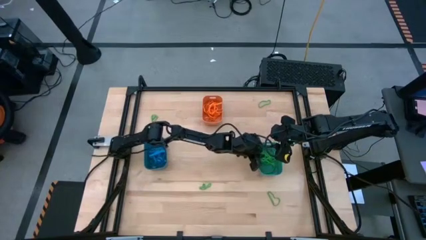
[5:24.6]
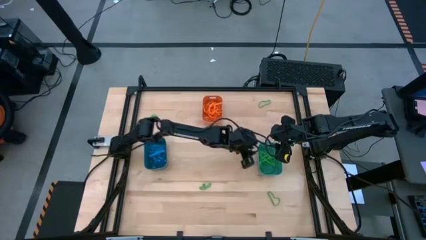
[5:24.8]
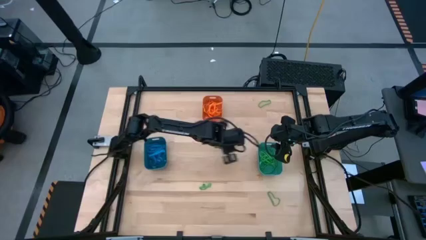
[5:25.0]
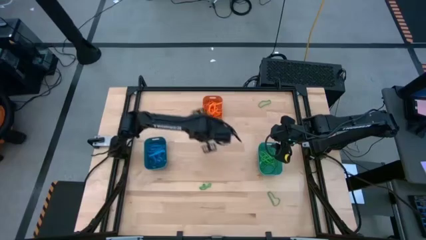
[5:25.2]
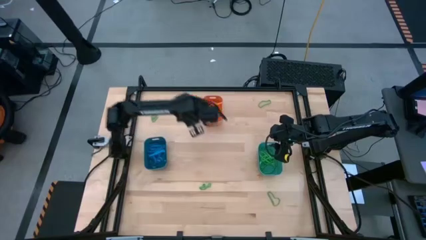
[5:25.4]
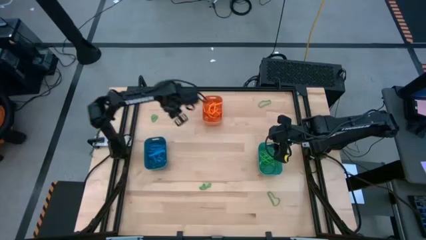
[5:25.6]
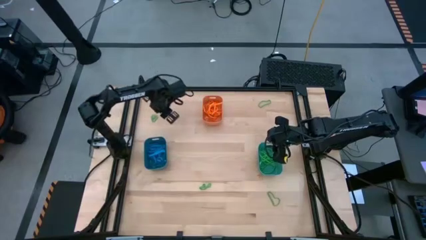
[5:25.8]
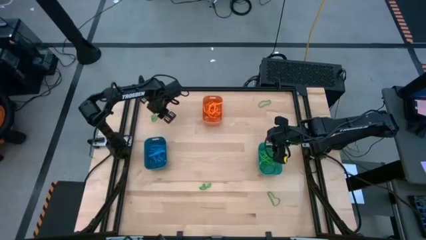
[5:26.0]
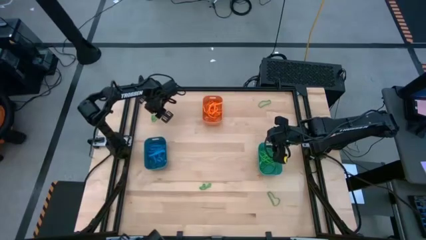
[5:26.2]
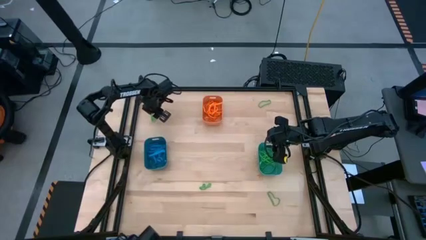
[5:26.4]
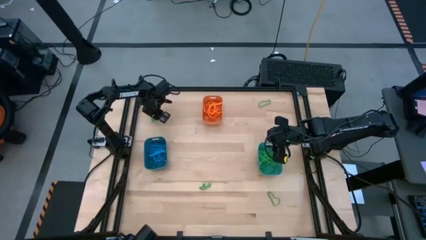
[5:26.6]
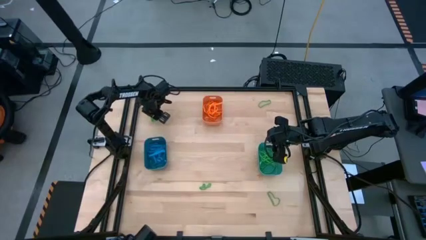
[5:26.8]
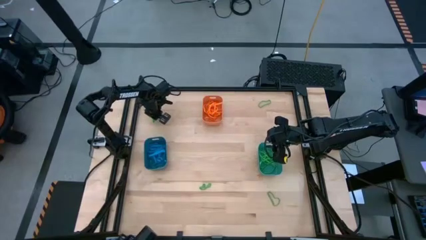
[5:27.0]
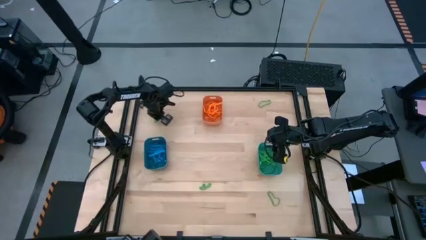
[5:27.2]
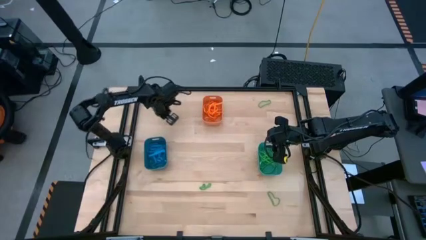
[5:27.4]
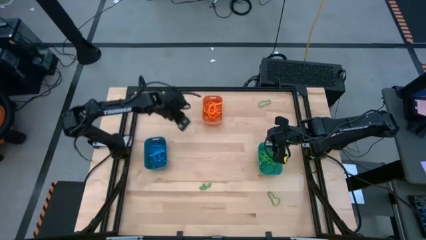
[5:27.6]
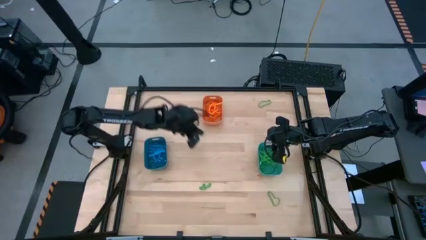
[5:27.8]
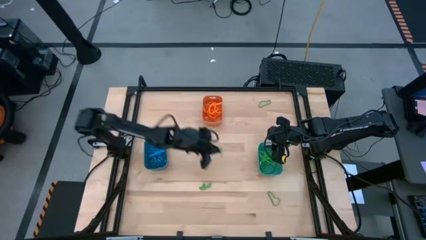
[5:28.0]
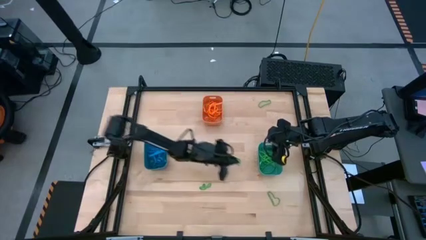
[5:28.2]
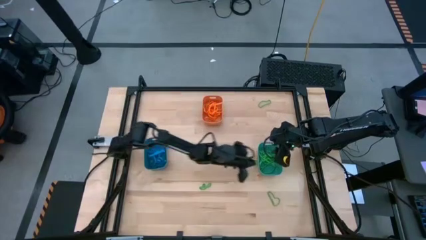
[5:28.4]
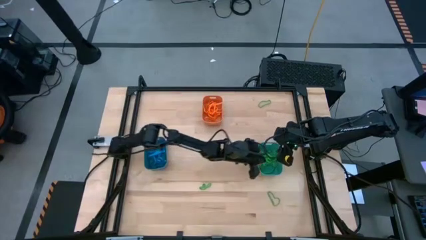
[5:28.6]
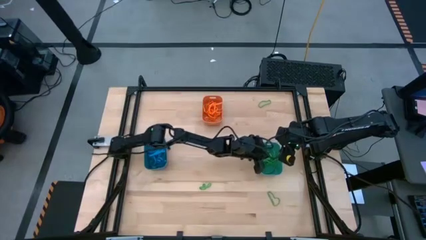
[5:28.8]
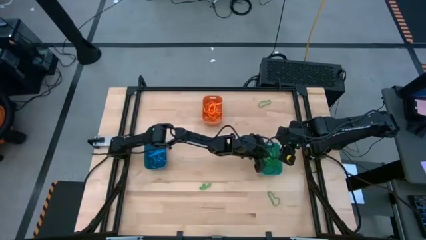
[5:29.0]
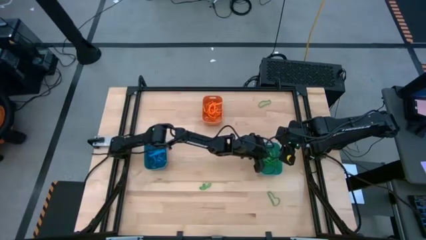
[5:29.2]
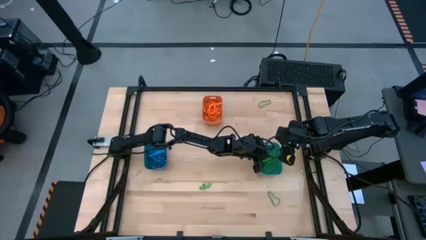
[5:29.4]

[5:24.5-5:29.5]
Task: Sort rubber bands into baskets
Put the green rubber band into the green bin

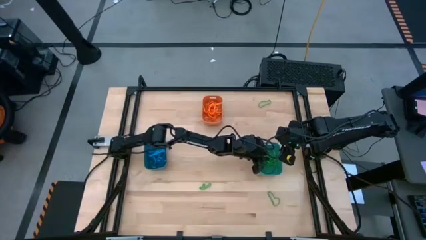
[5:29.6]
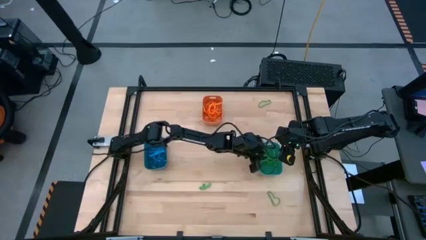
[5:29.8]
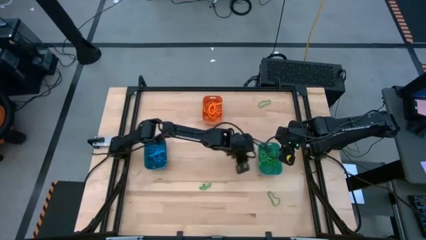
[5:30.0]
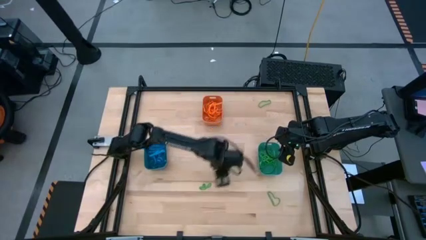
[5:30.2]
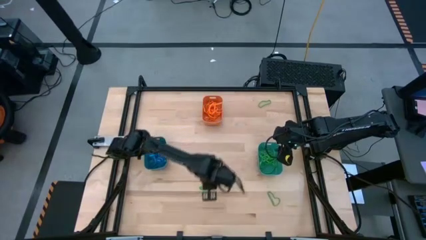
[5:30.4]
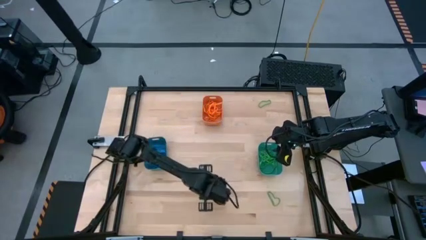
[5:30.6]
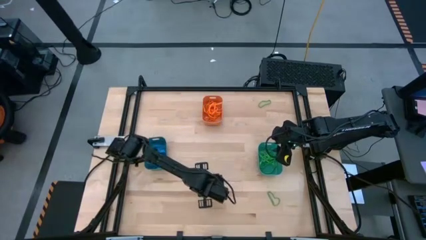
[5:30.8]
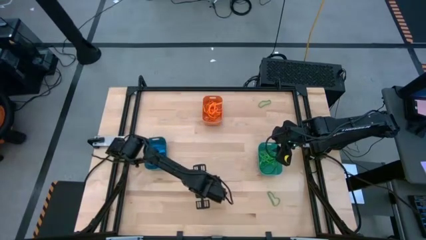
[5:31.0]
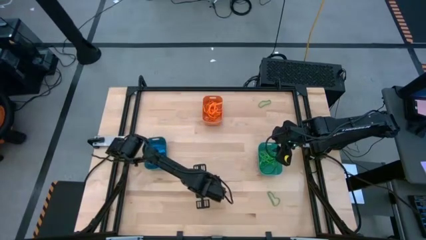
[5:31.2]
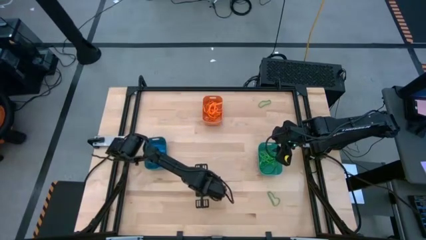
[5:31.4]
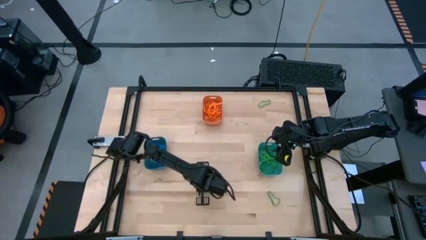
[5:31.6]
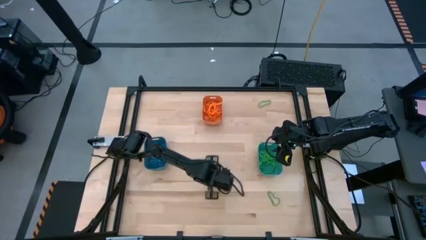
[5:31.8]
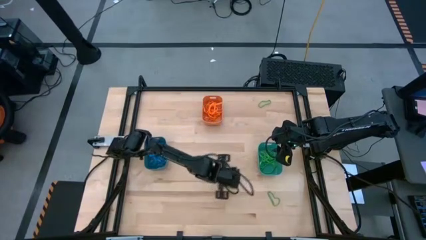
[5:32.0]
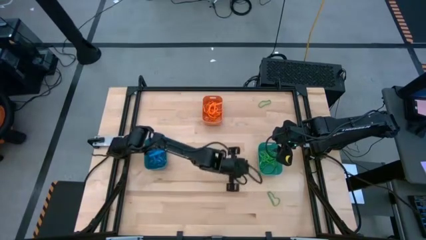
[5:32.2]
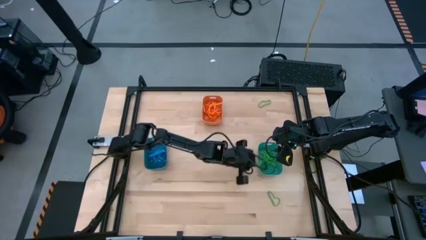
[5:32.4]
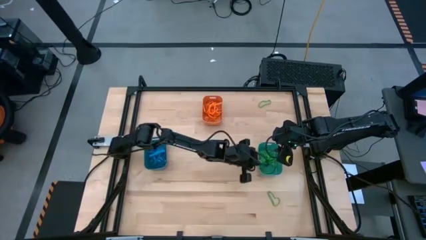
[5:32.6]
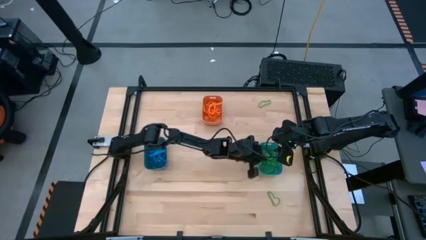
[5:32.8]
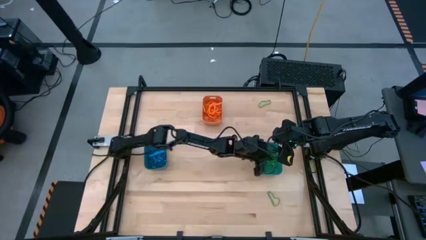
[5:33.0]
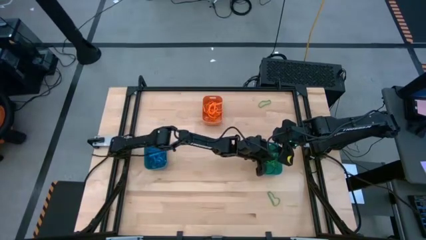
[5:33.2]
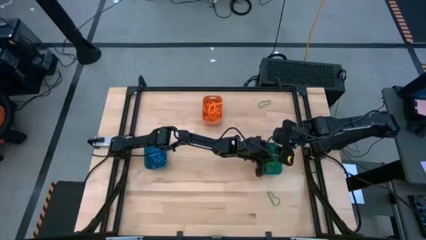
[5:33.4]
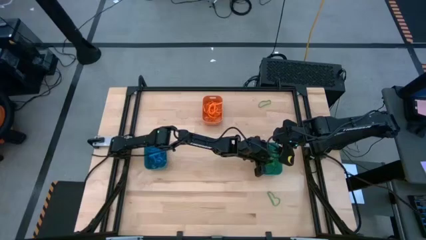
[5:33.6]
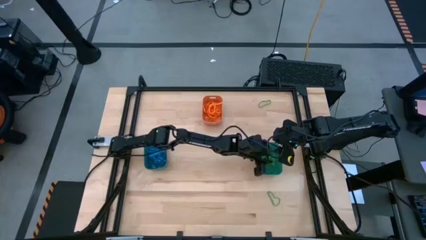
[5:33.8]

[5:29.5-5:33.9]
Put the green rubber band into the green bin

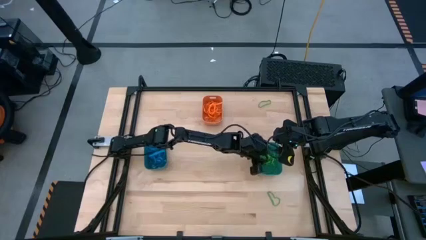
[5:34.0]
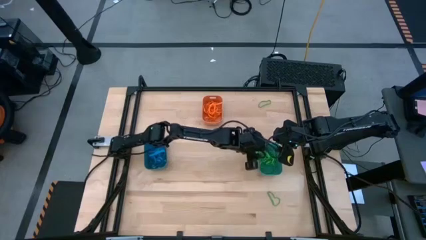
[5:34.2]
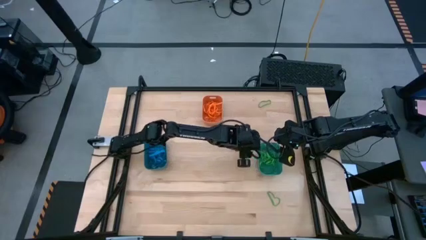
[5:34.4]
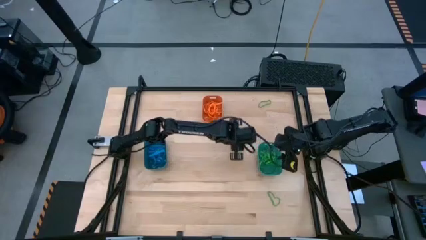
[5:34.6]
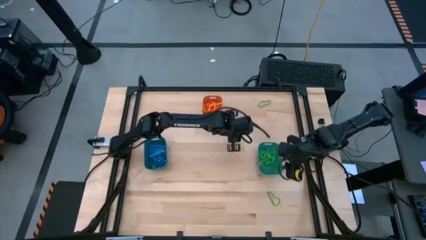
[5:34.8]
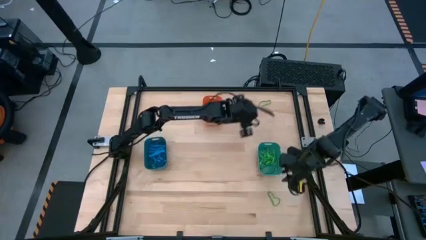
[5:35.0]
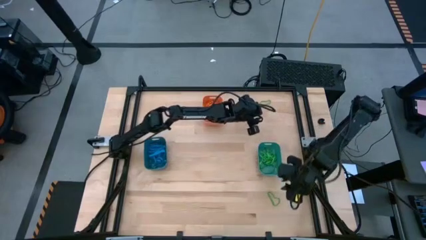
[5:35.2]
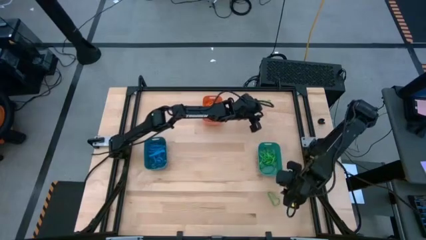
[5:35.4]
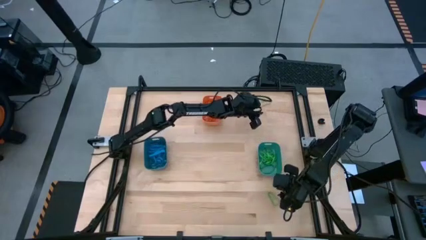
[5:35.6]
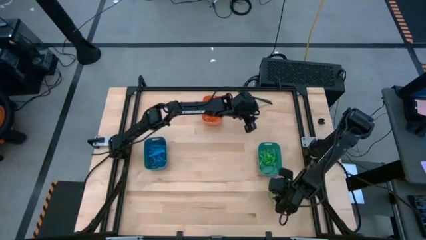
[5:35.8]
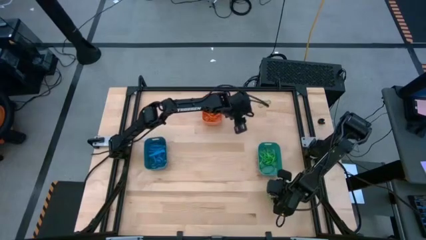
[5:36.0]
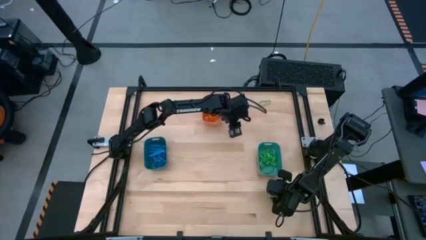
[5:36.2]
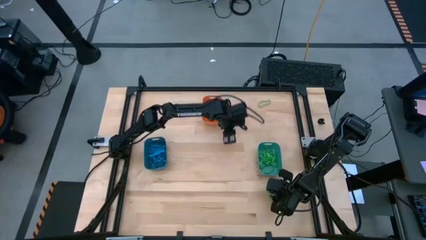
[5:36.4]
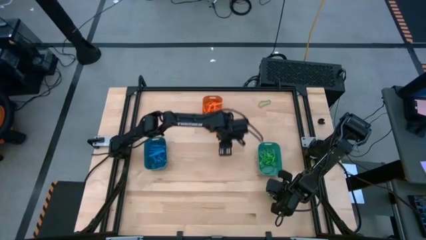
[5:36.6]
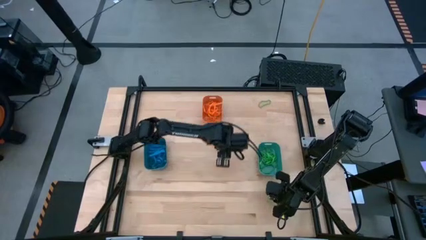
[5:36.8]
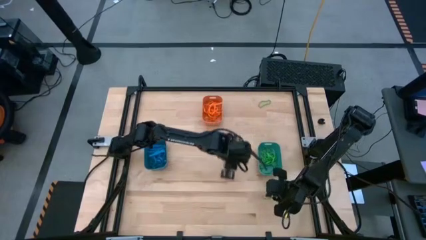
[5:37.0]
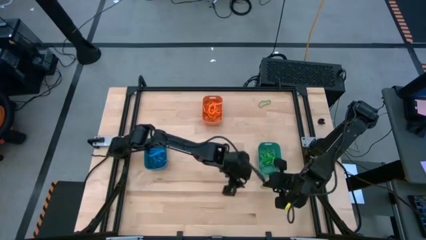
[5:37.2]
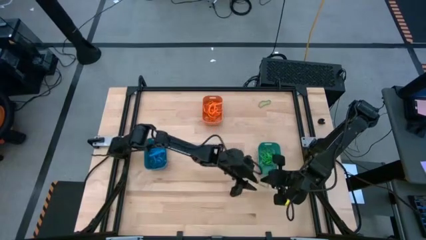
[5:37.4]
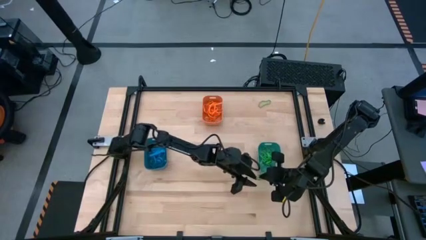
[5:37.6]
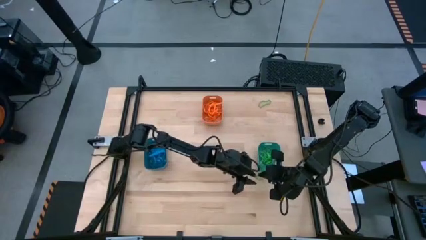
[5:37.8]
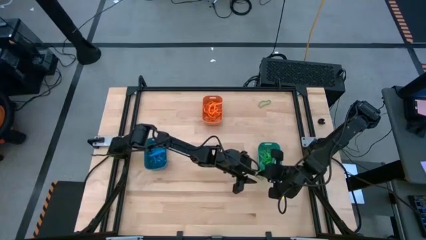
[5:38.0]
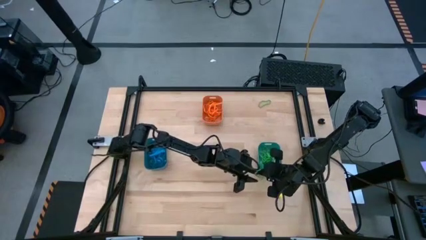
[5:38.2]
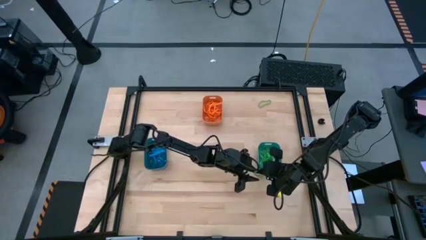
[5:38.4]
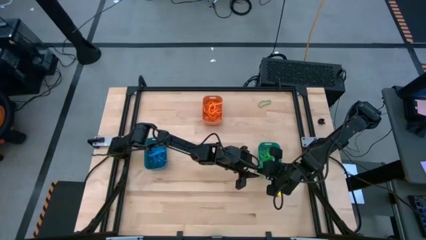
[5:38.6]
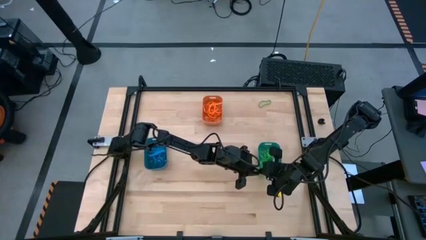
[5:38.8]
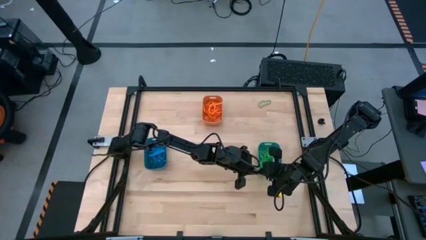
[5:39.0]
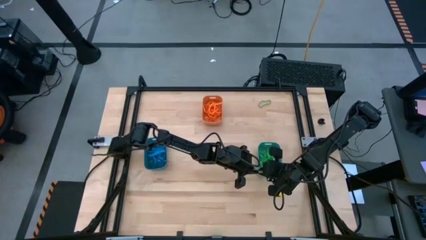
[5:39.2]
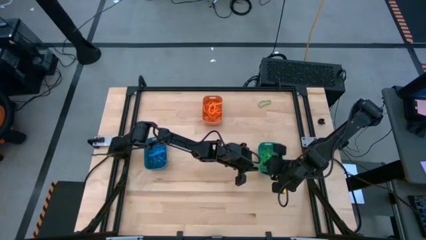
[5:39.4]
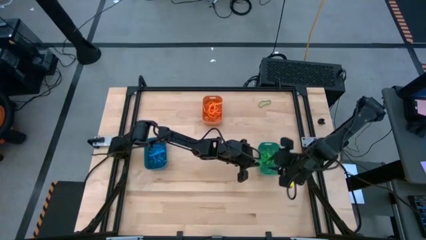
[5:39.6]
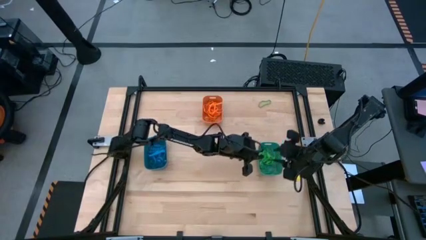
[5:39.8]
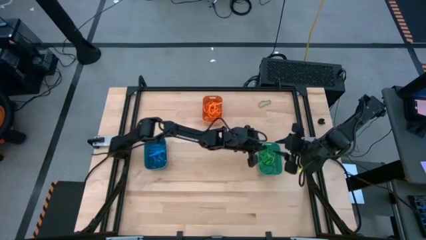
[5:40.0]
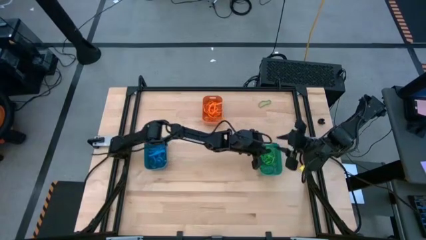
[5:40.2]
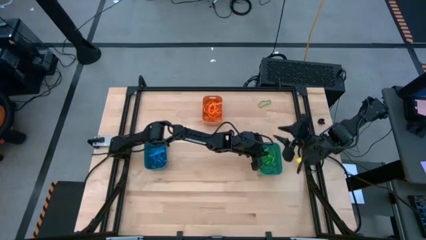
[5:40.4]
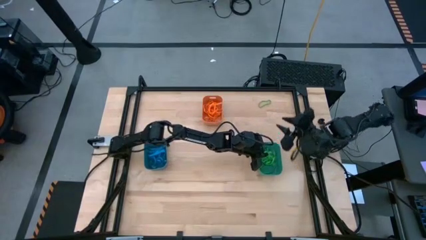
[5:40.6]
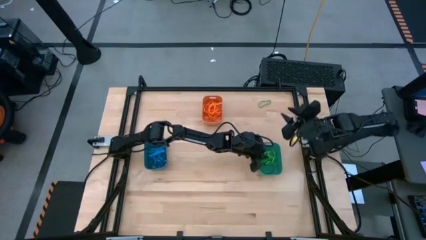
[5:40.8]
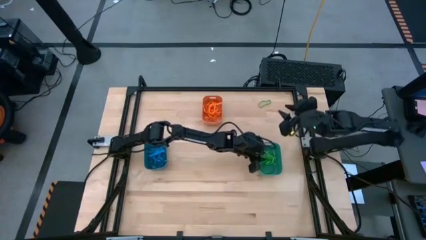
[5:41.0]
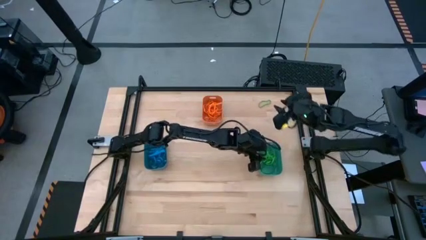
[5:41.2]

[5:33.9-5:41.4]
Put the green rubber band into the green bin

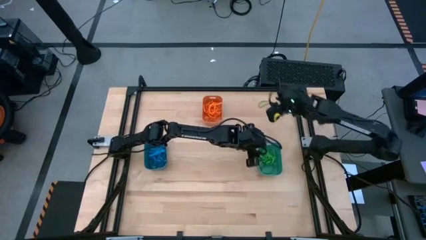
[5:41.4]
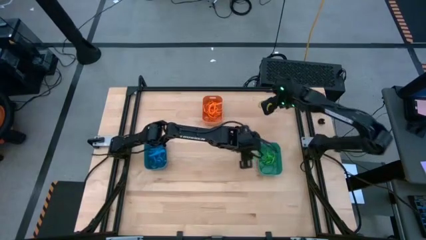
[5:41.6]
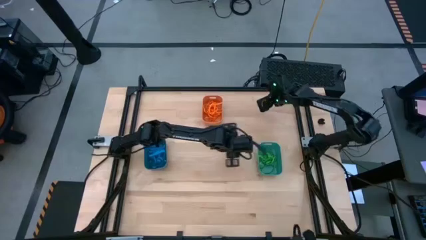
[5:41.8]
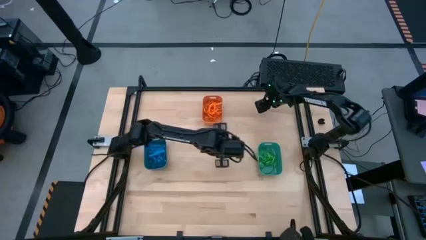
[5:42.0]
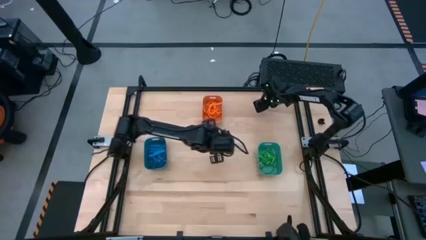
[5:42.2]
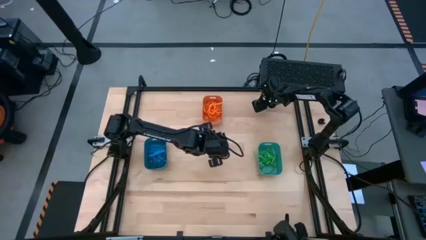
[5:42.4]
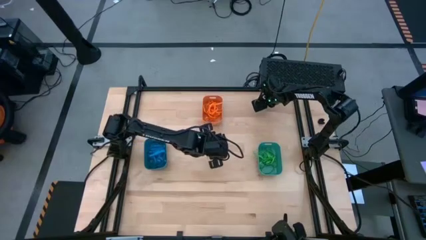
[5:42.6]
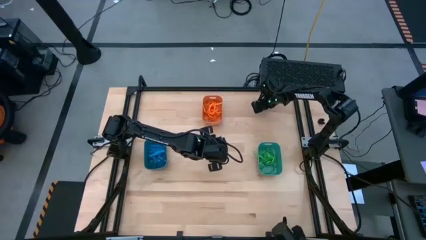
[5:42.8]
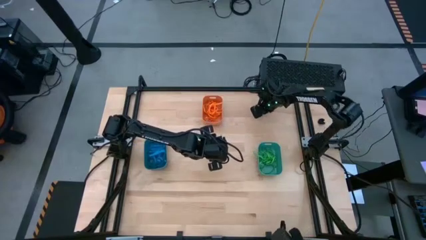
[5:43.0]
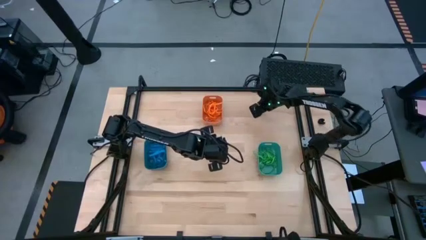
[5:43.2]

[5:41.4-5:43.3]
Put the green rubber band into the green bin
